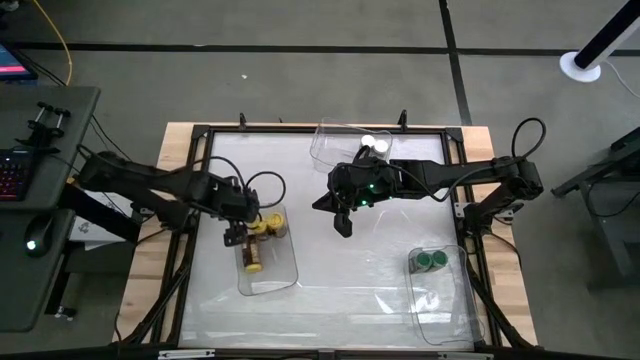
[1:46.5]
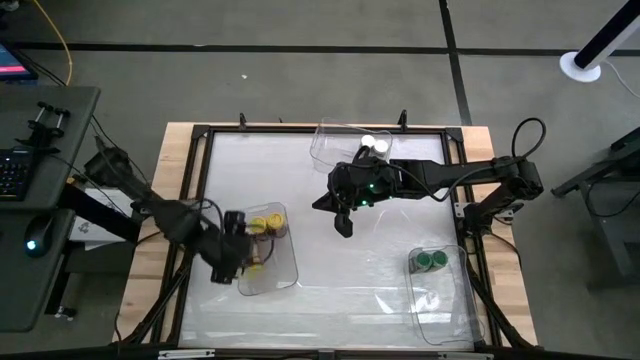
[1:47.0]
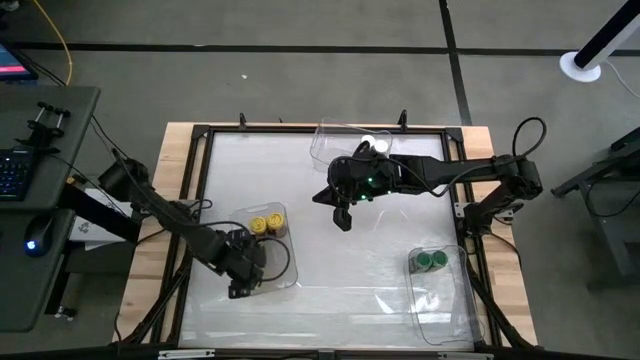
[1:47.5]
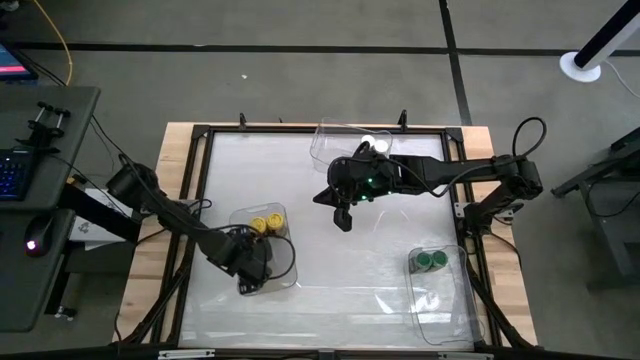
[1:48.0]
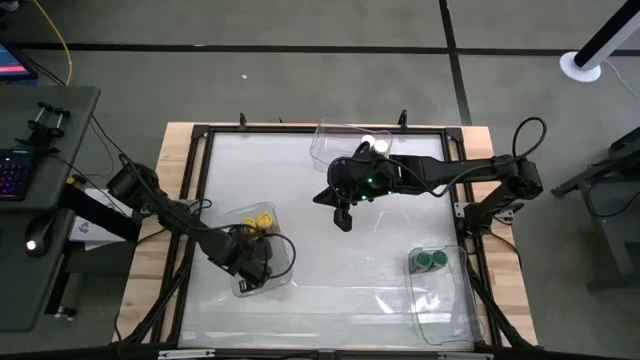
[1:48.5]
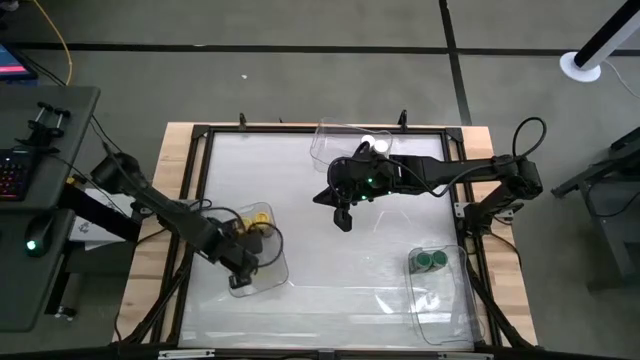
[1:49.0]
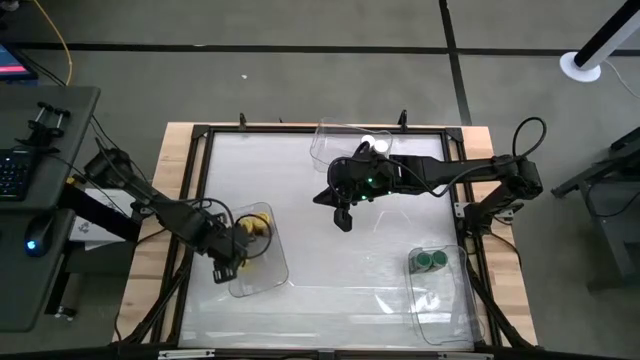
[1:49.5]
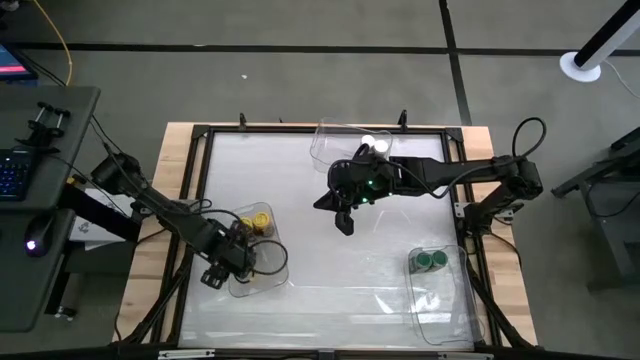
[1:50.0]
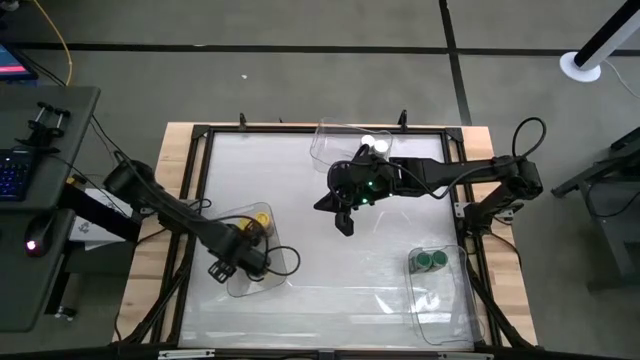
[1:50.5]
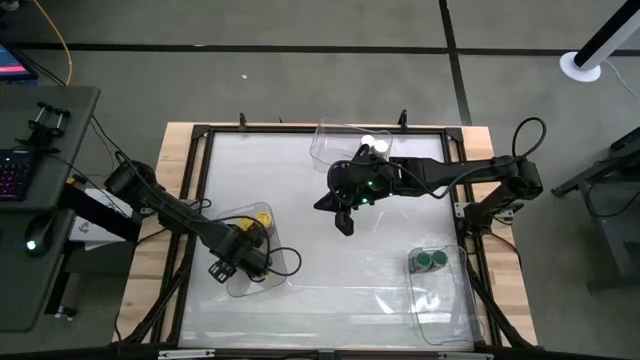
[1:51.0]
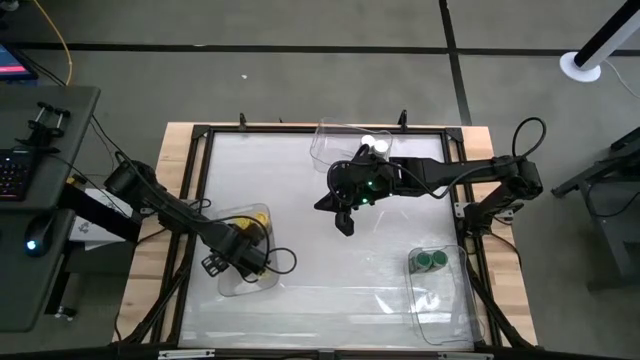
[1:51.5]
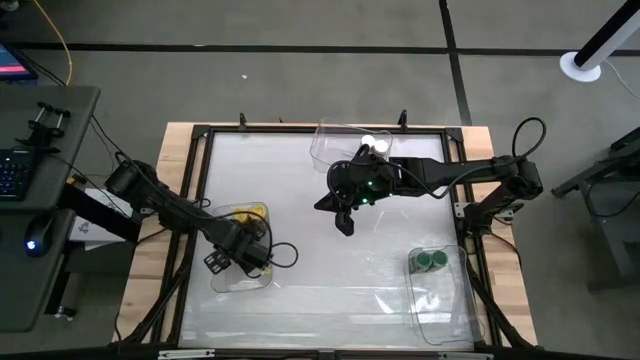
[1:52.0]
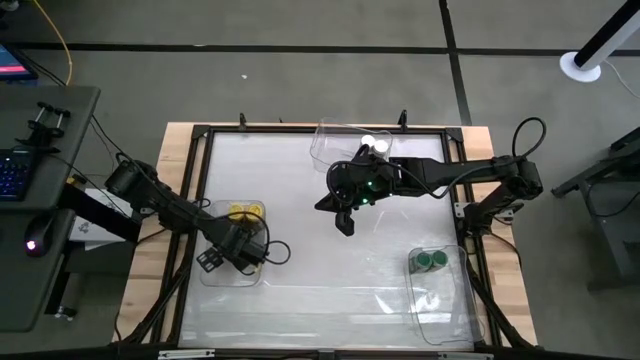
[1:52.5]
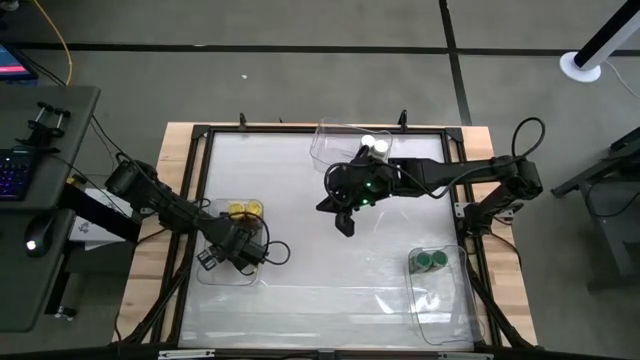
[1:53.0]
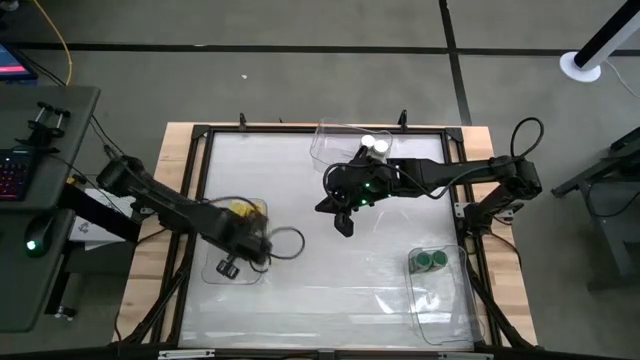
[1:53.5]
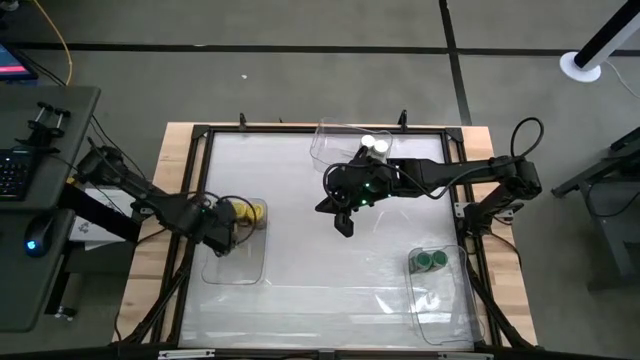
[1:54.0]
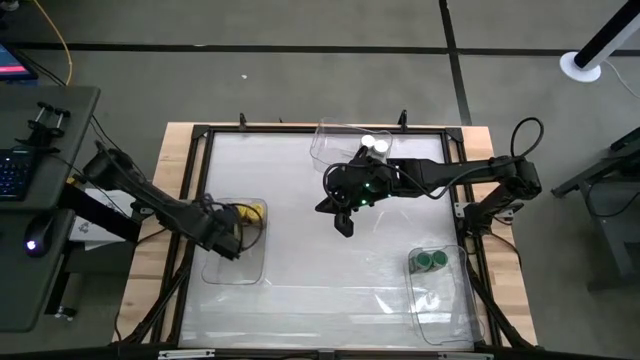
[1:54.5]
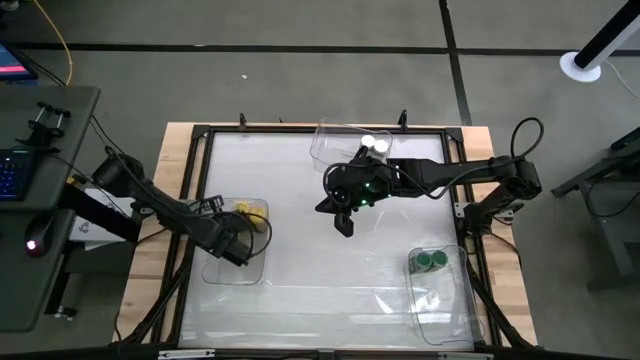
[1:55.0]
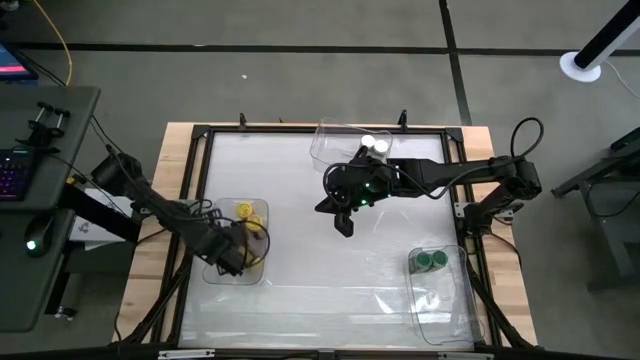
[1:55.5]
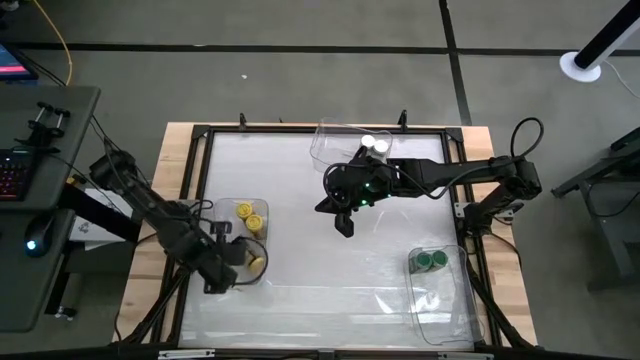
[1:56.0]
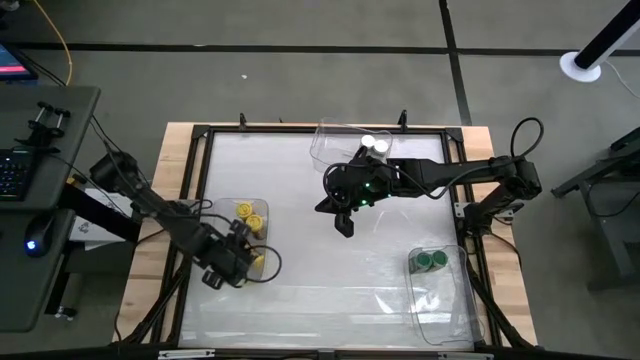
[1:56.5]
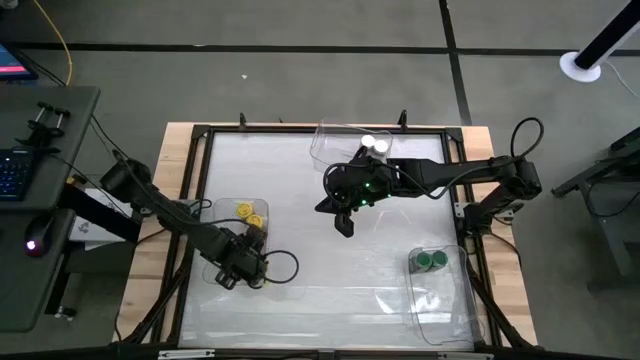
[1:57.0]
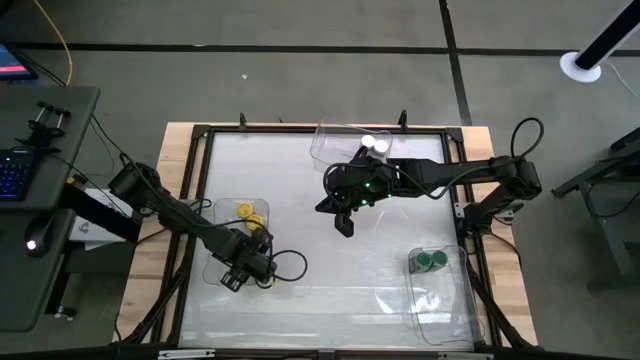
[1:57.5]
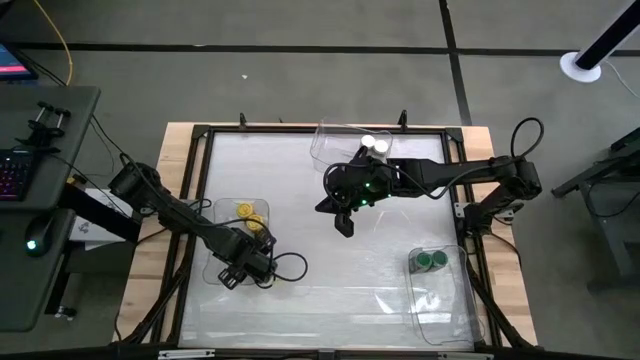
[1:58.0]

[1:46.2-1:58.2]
Task: Sort spices by type
Put the yellow seasoning bottle into the left transparent bin

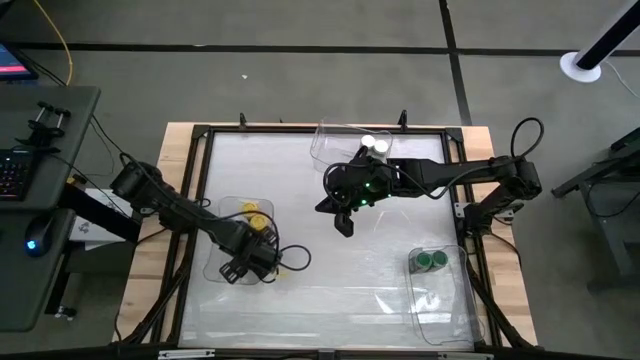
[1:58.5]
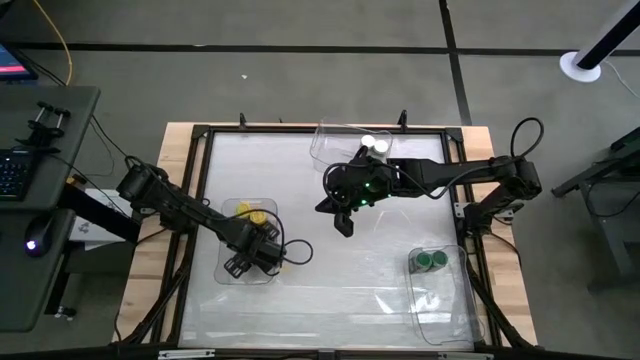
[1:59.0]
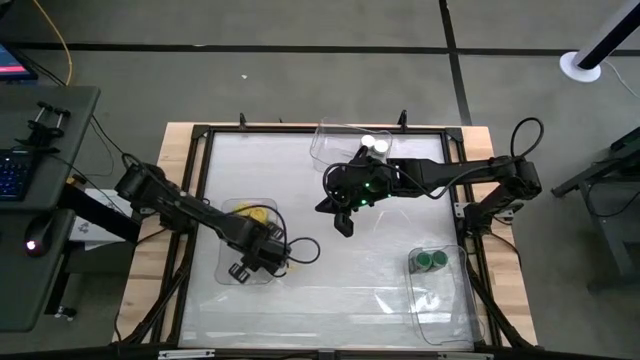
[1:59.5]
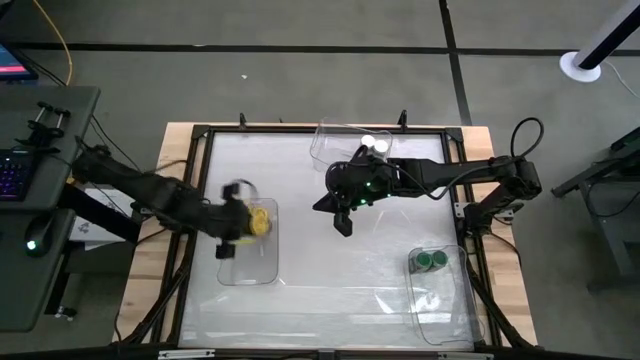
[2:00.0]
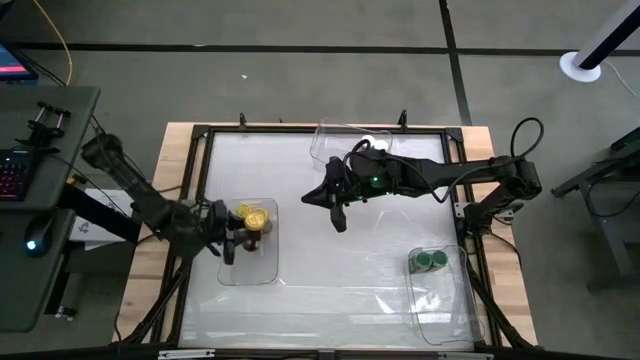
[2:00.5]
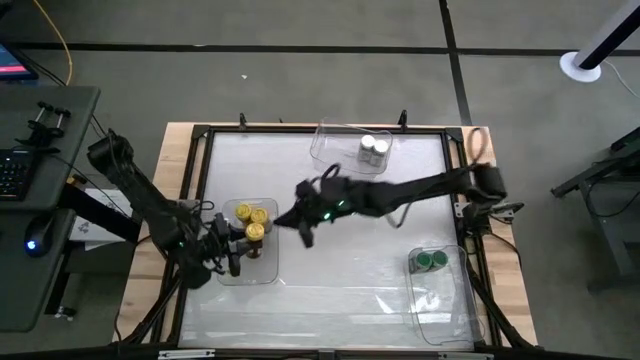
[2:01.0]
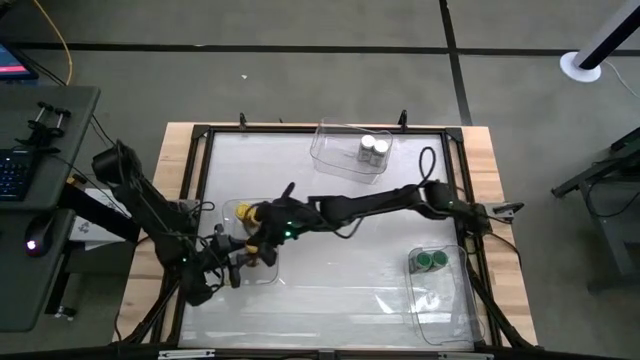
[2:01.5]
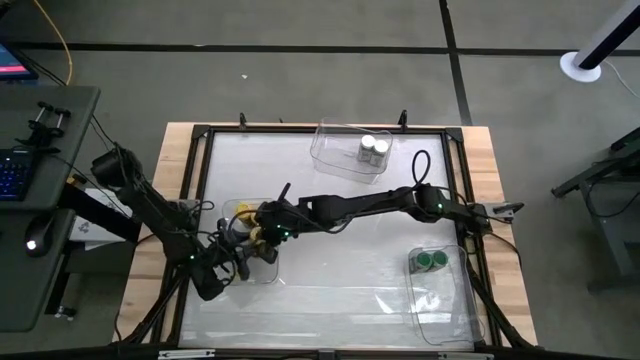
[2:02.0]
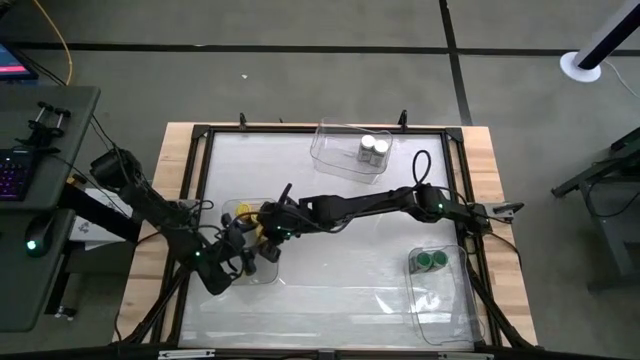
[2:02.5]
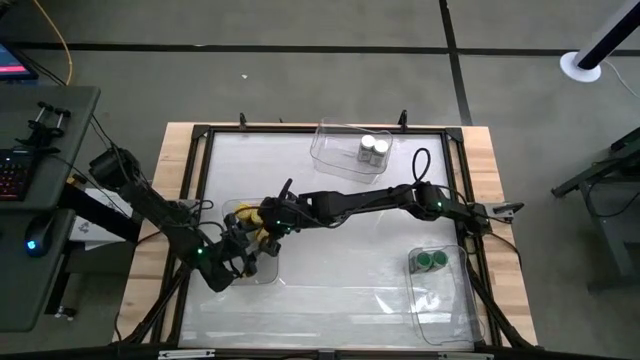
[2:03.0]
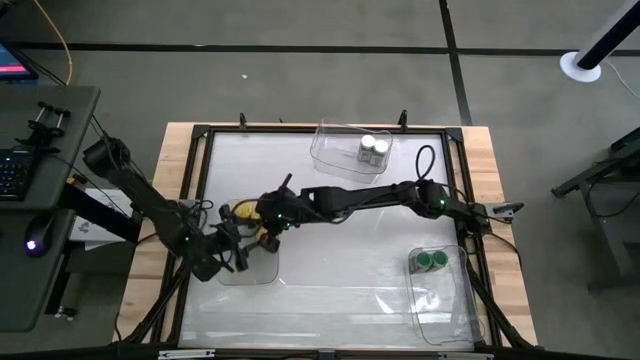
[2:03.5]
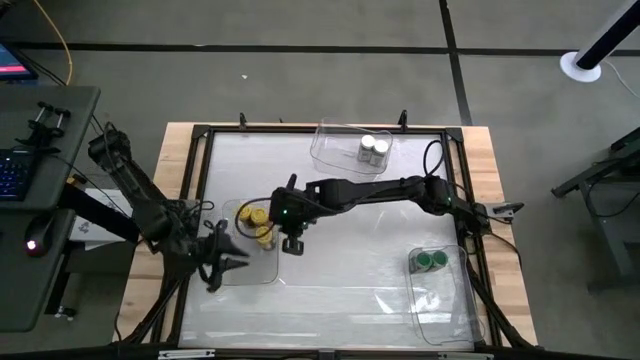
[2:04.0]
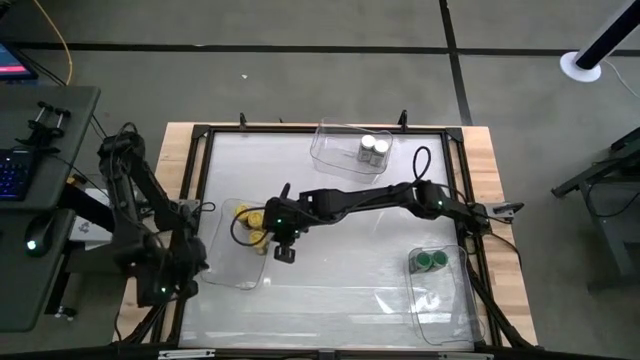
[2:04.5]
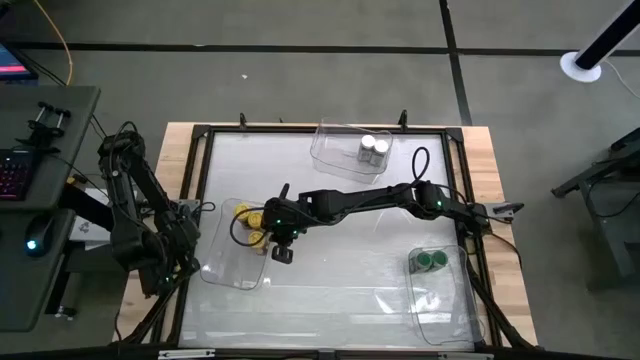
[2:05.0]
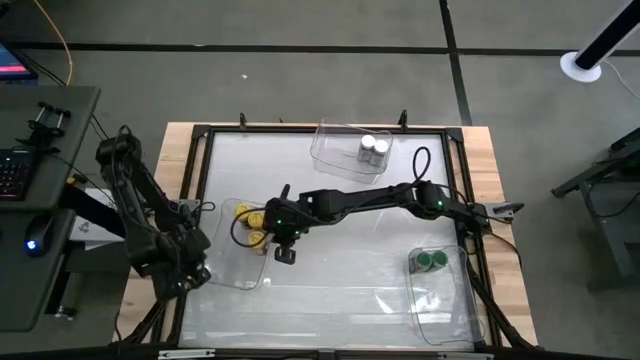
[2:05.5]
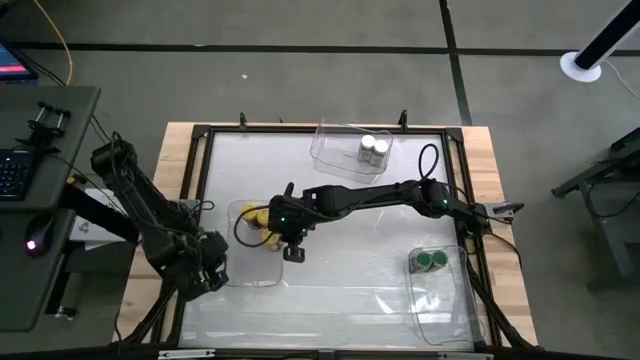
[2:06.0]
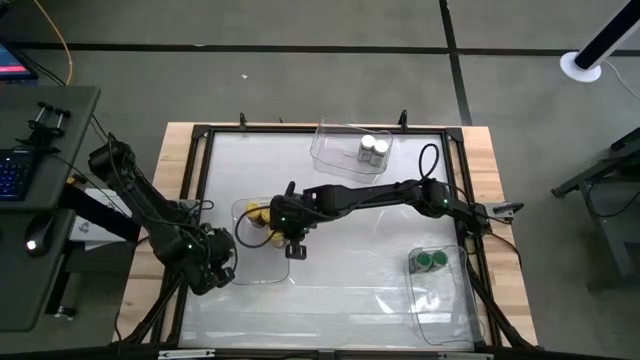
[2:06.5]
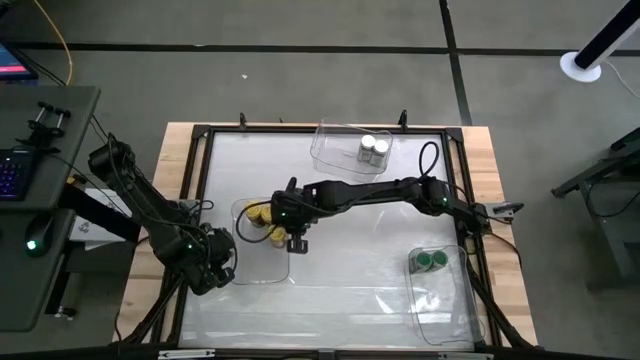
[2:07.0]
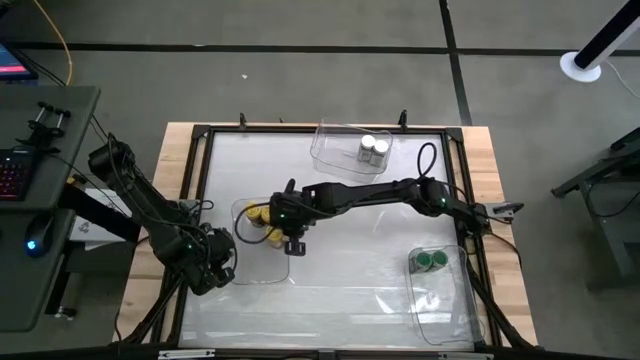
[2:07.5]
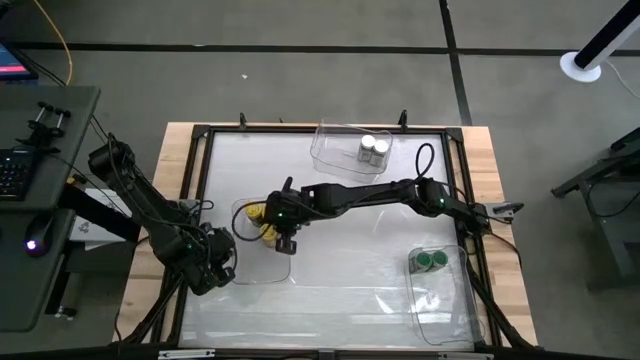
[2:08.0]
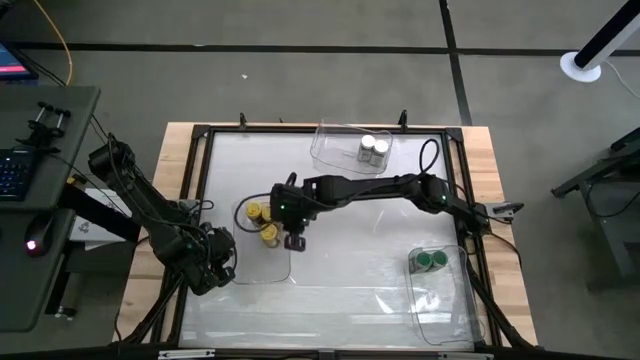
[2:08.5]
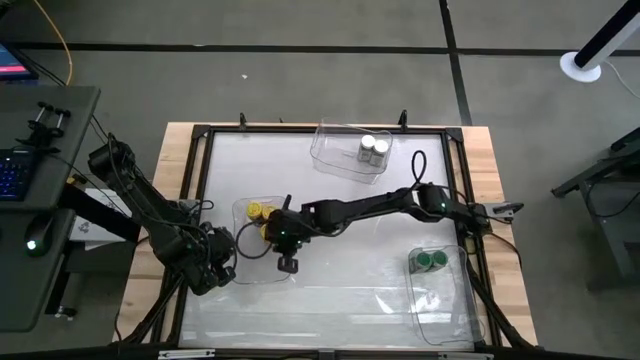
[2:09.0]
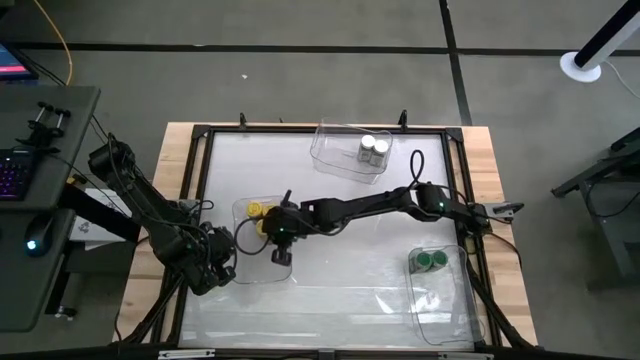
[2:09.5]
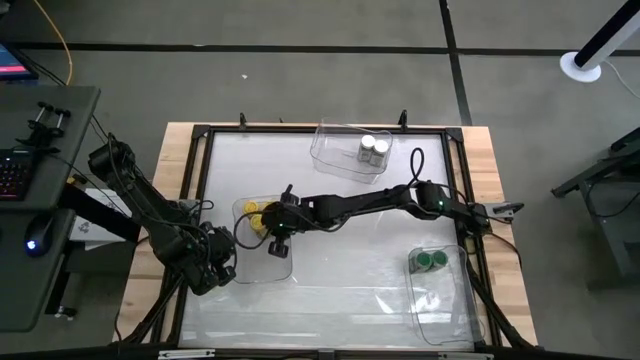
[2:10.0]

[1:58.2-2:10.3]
Put the yellow seasoning bottle into the left transparent bin
